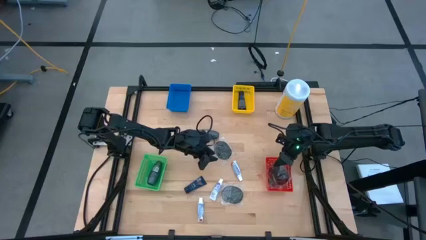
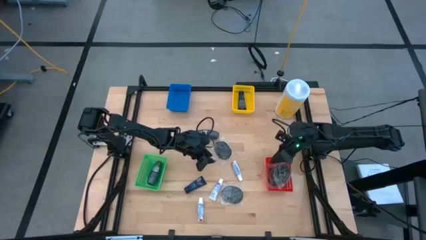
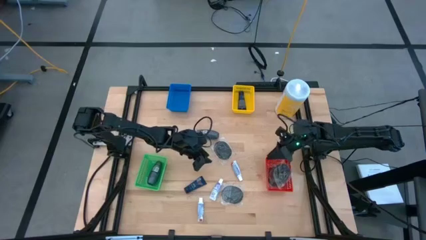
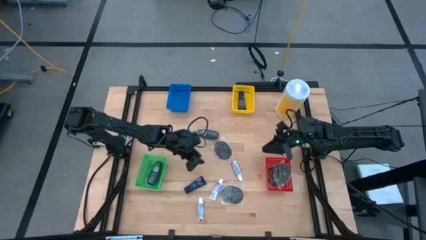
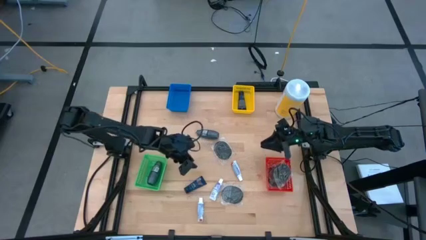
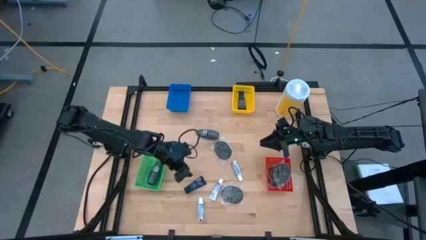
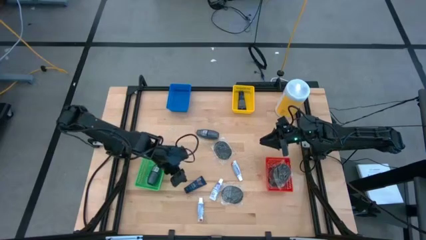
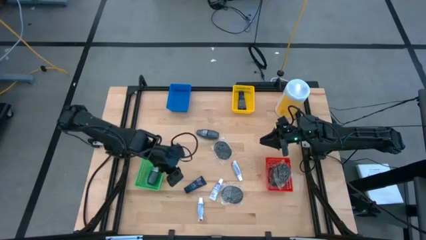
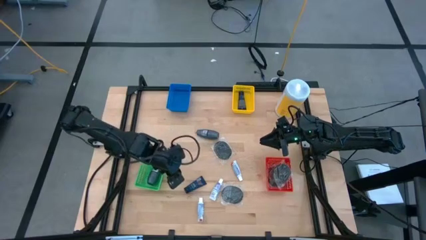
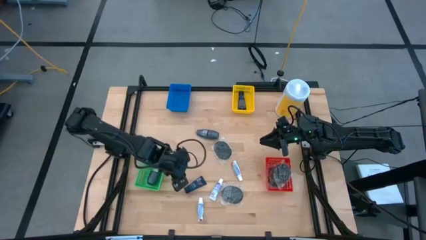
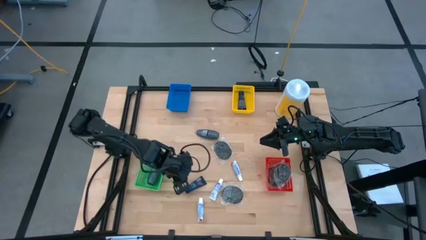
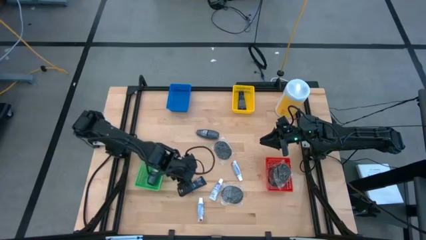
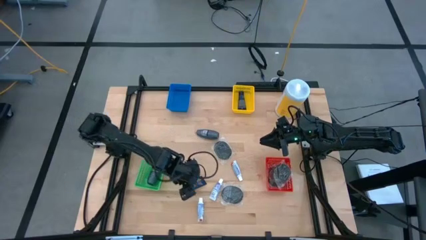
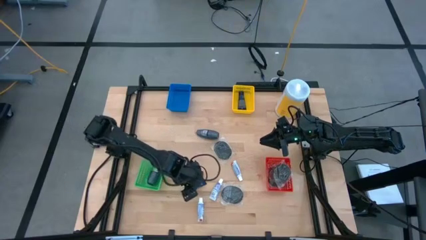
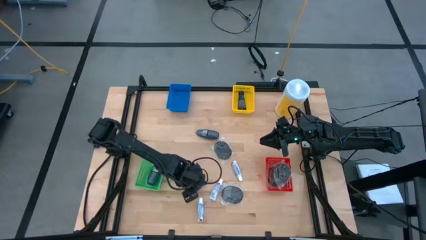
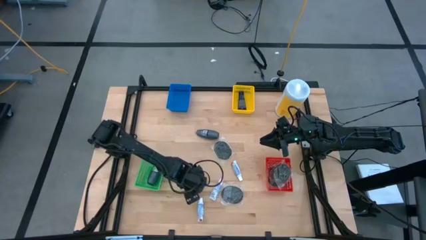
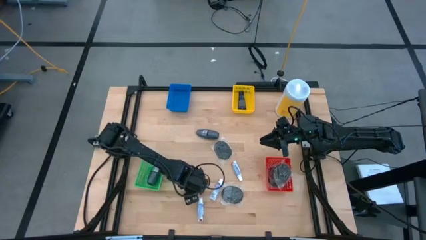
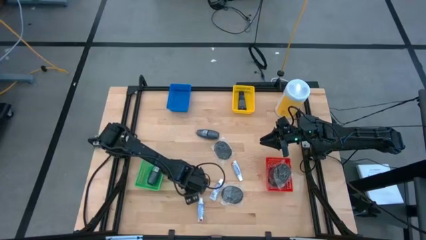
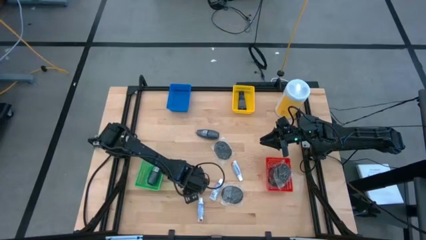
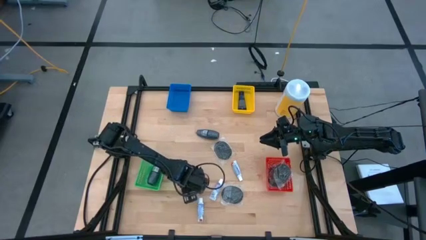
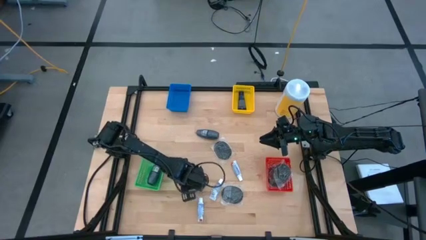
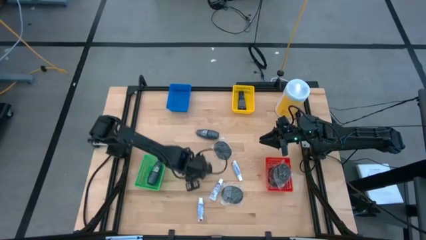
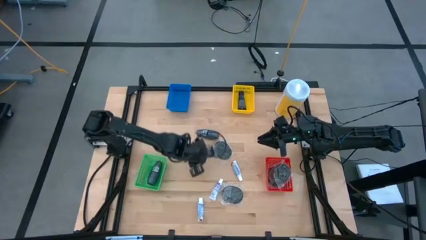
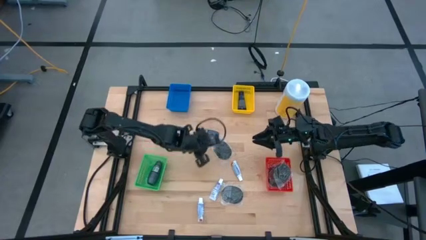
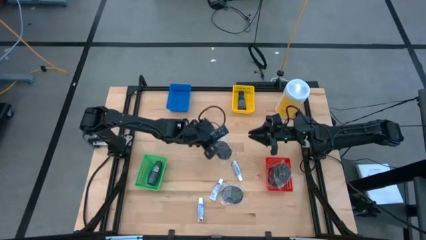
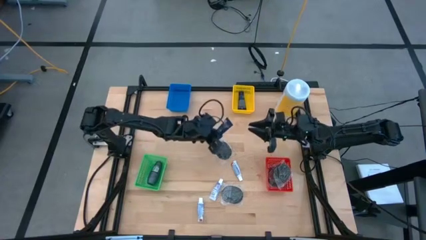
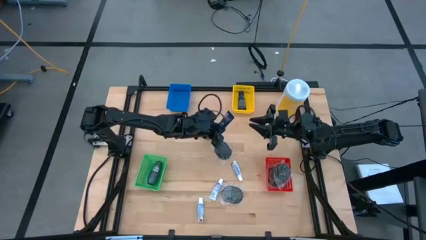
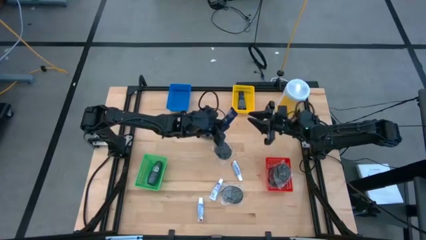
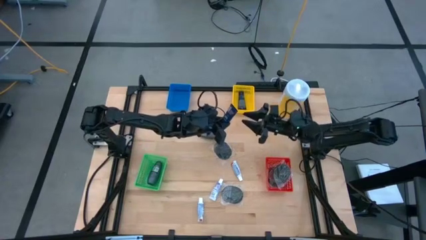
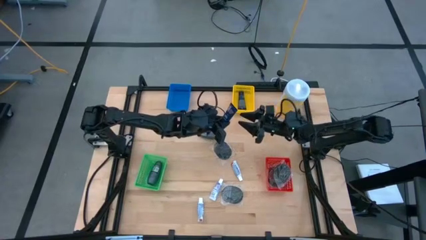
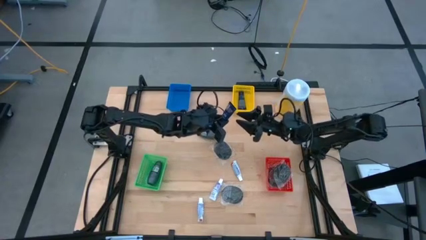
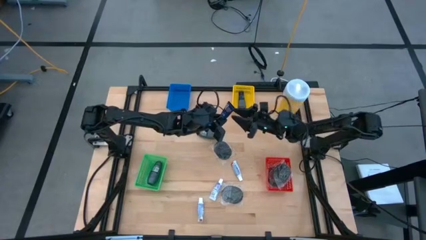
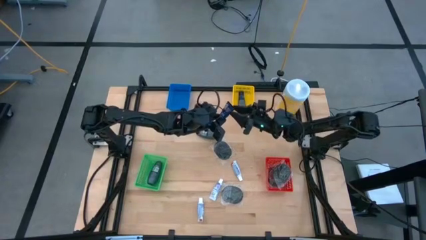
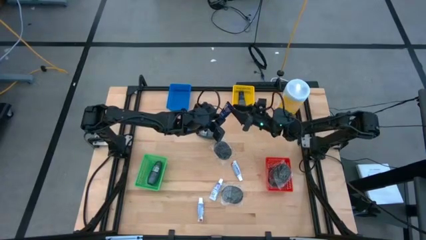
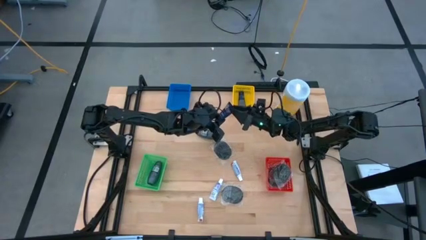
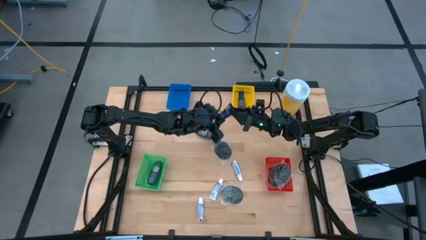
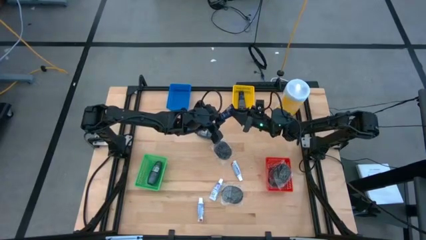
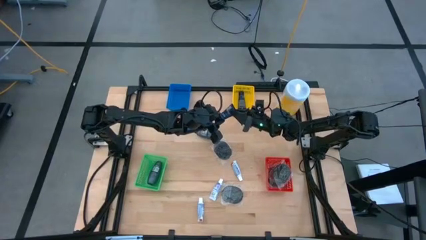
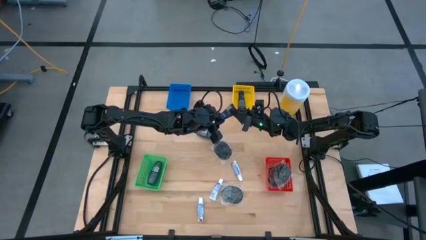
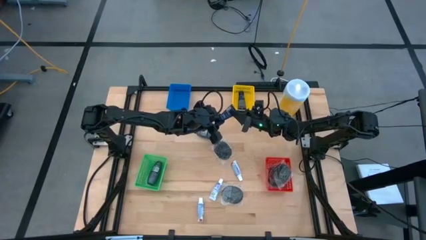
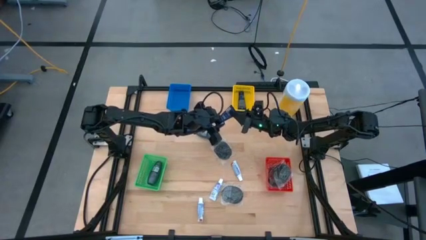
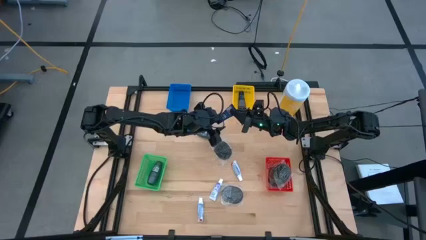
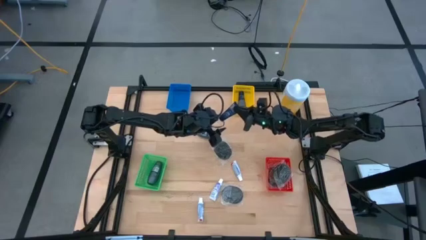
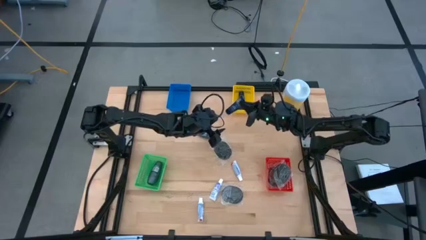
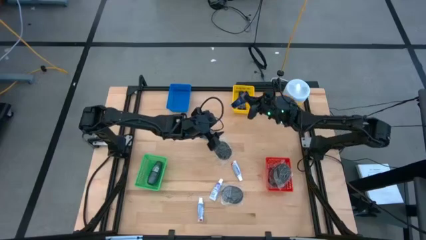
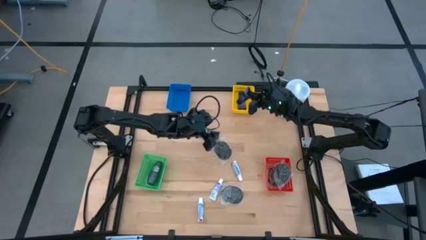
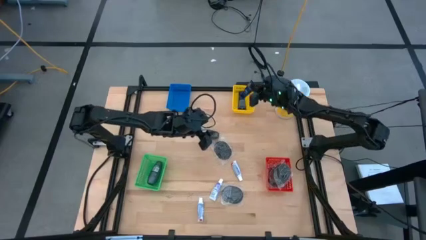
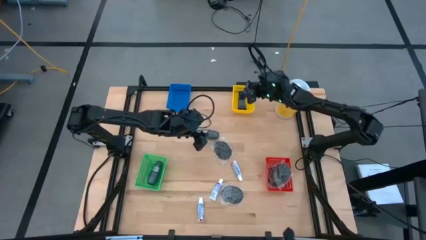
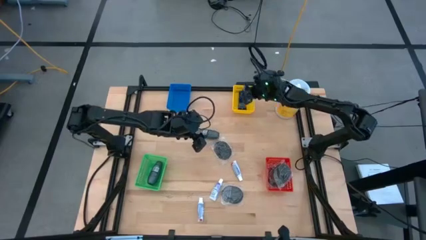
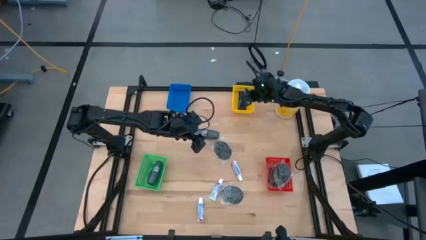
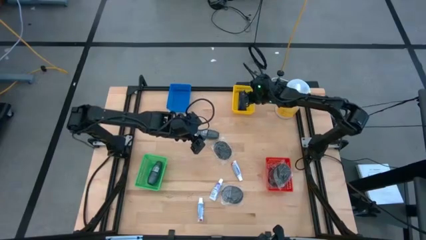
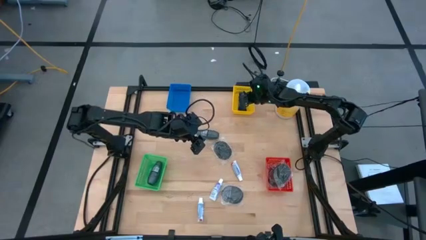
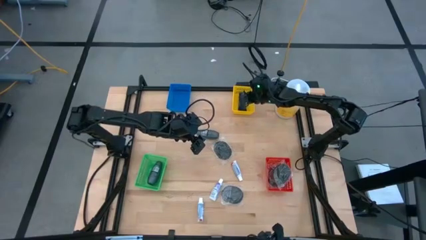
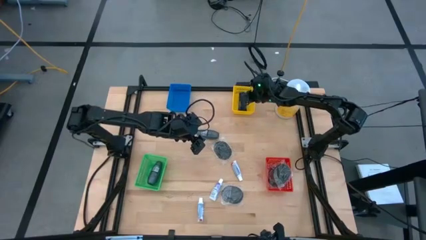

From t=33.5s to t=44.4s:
Task: Pick & Place Travel size toiletries
Put the shaving cream into the yellow basket

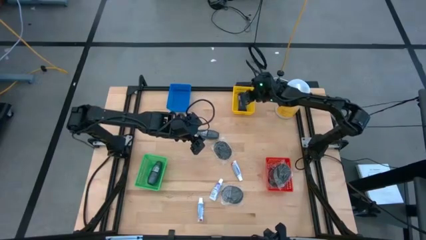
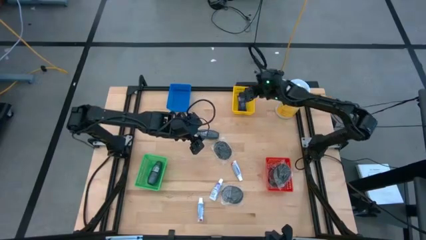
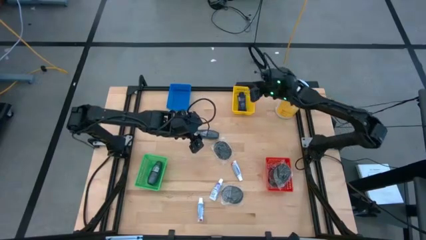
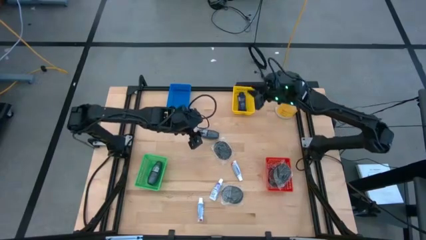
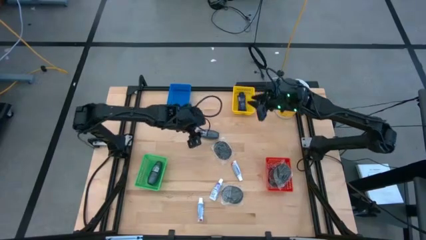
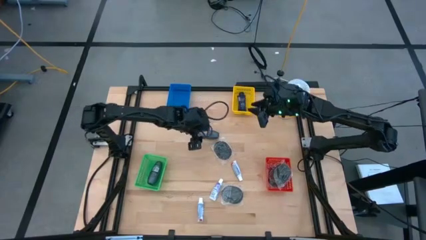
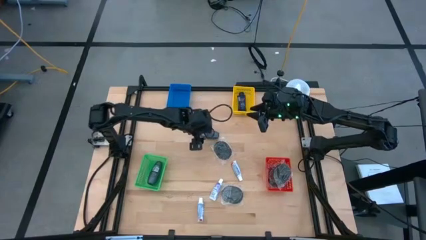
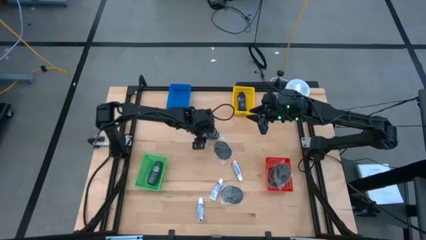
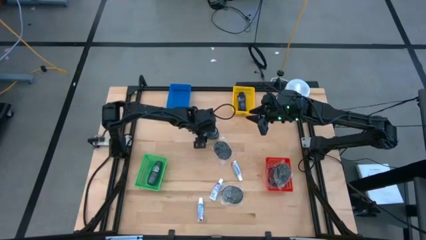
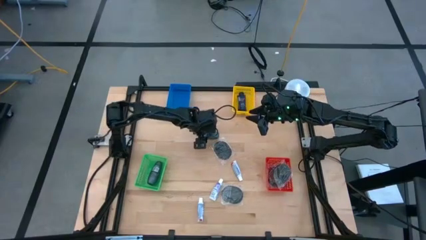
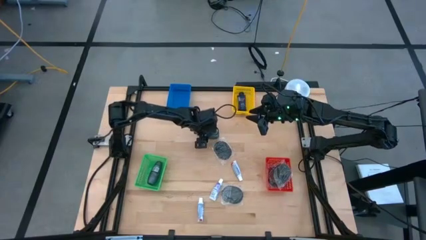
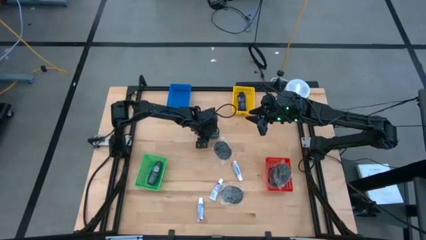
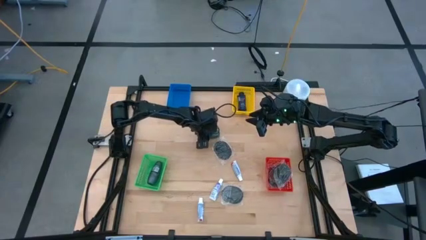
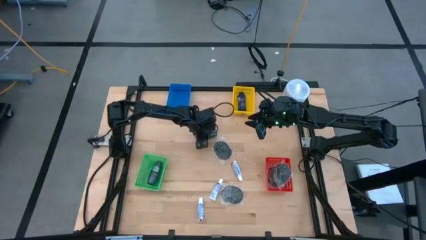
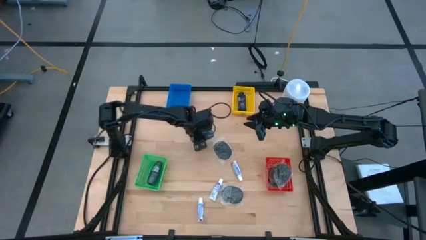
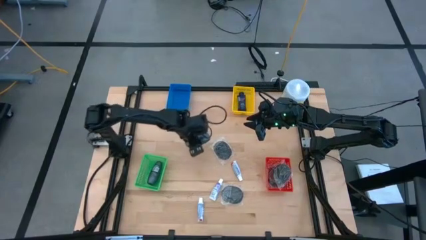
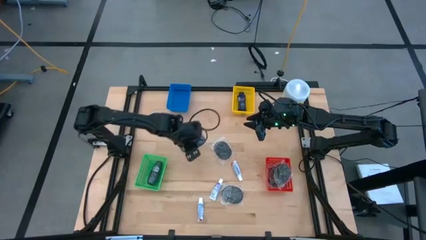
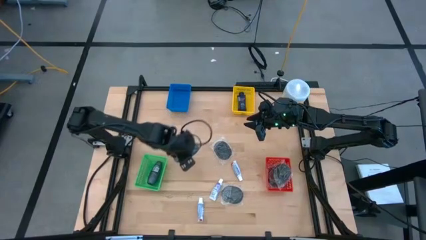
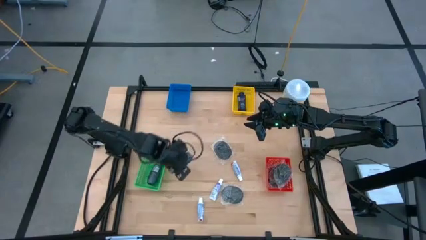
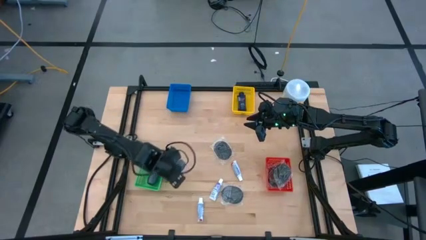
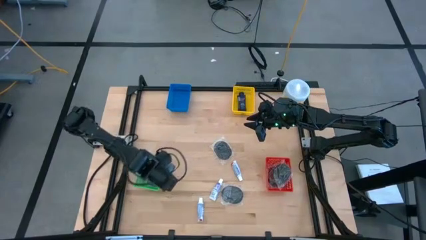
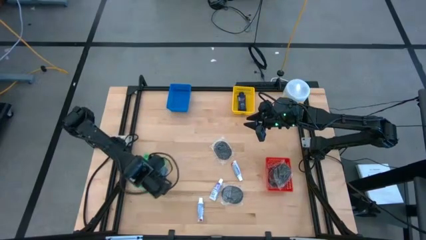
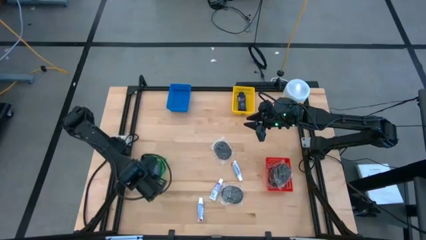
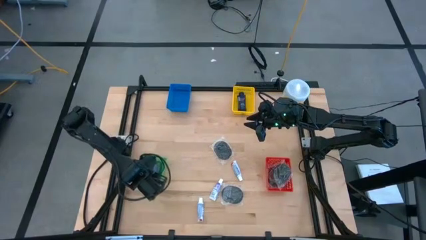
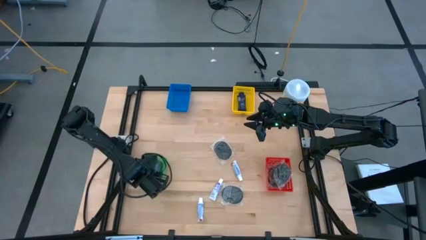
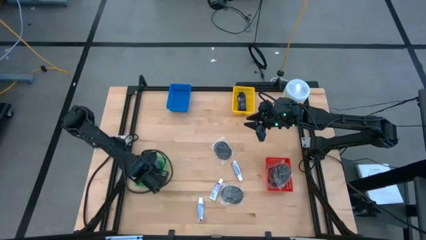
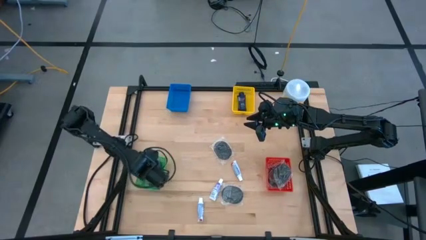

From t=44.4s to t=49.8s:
Put the deodorant into the green basket
